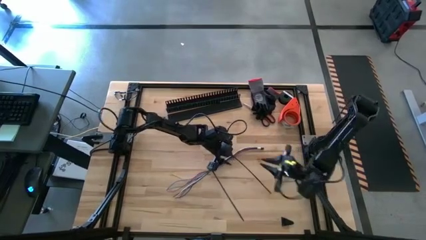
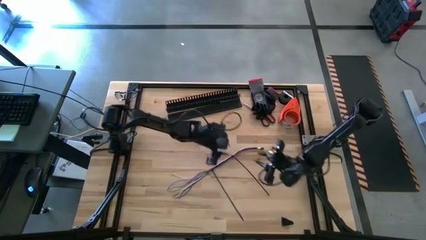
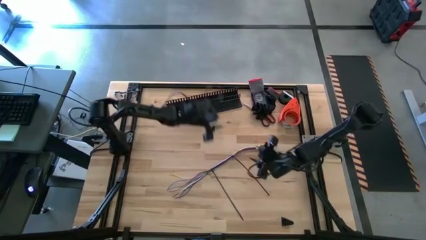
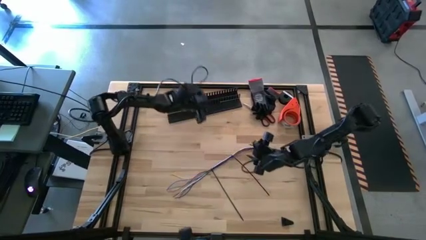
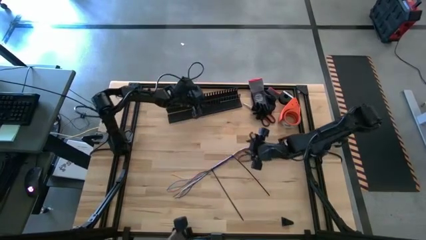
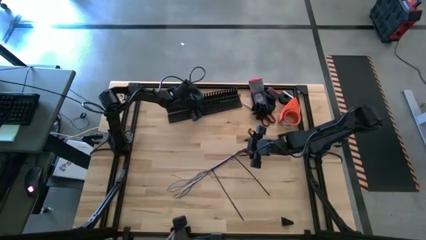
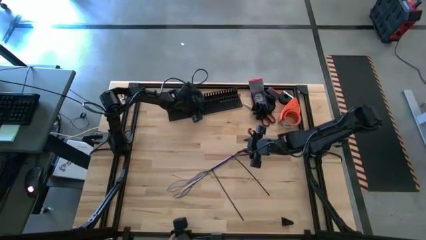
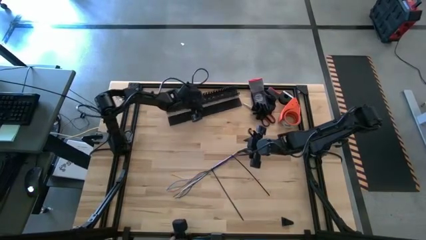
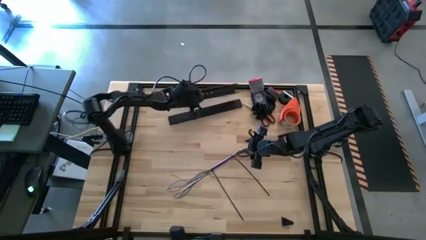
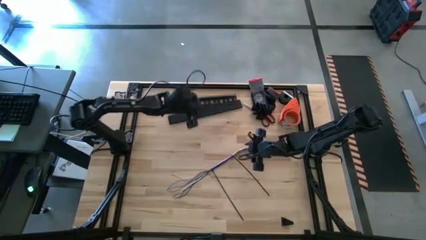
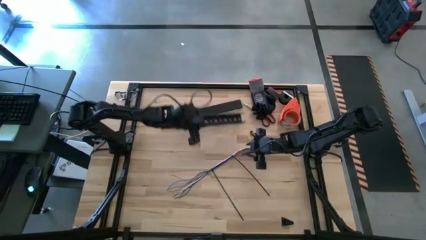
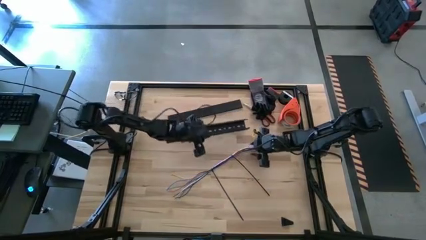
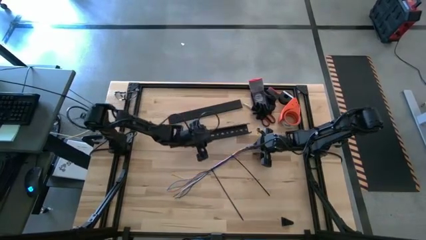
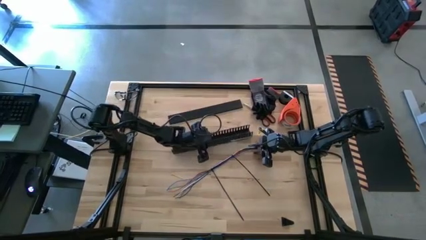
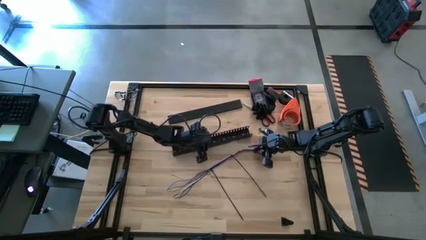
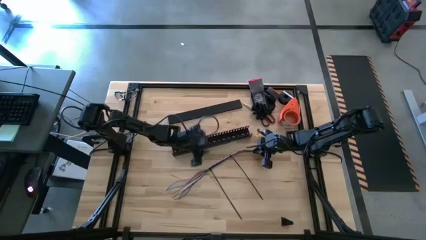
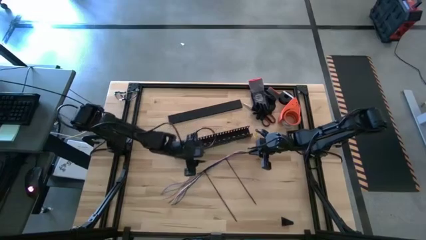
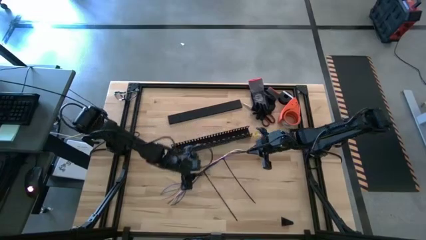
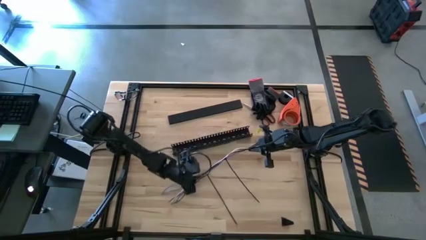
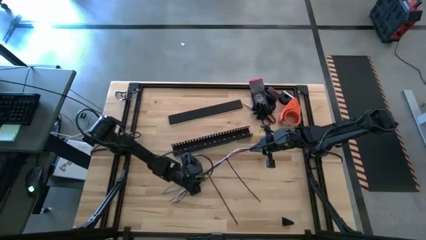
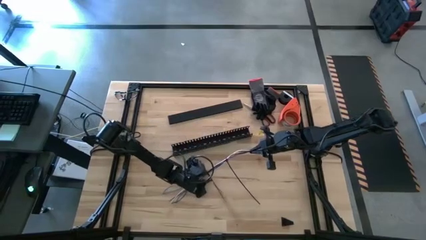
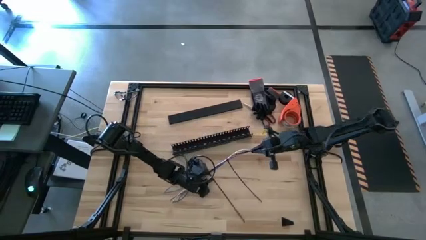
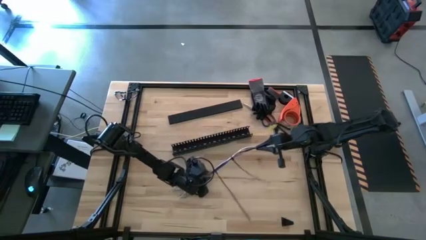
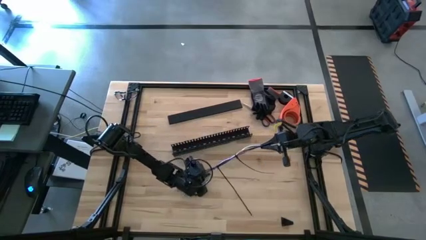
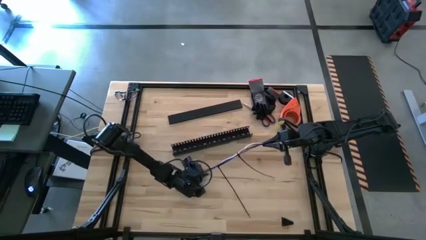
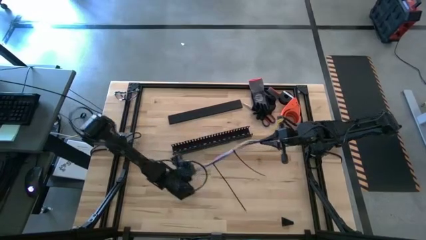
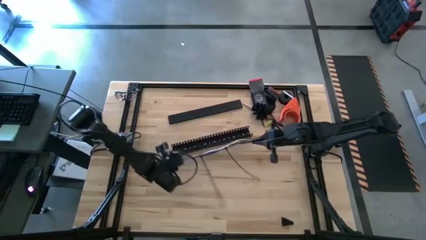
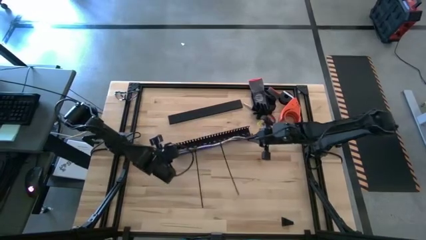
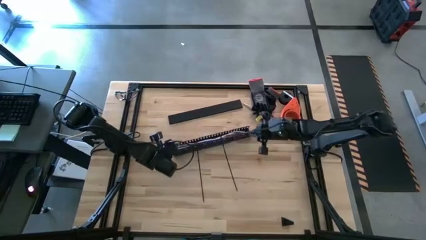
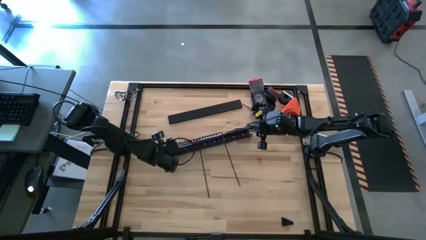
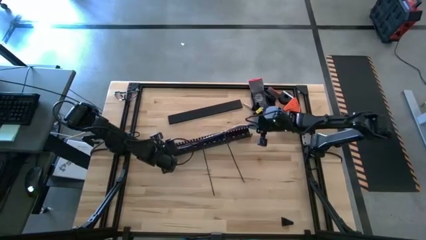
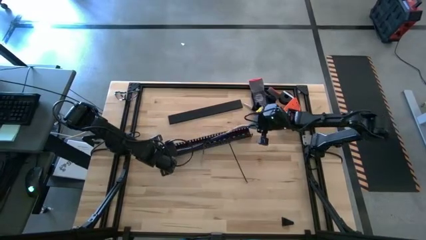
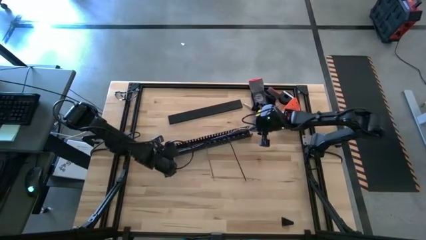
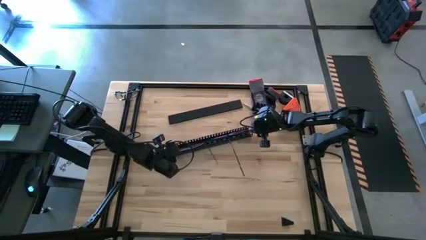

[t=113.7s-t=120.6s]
Task: Ziptie cables
Put the colored cable bundle into the black cable duct

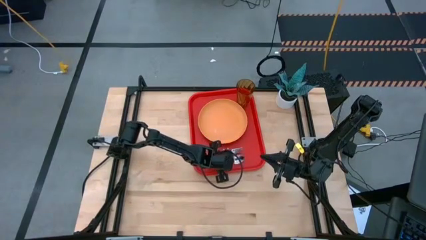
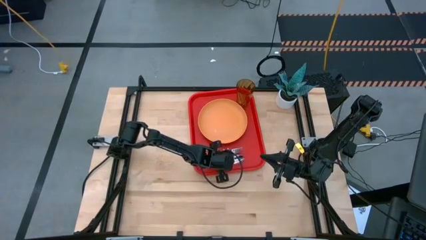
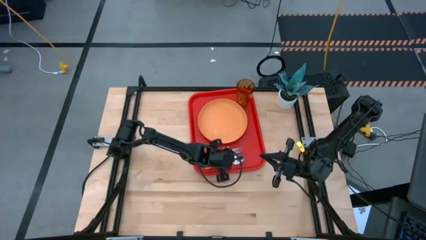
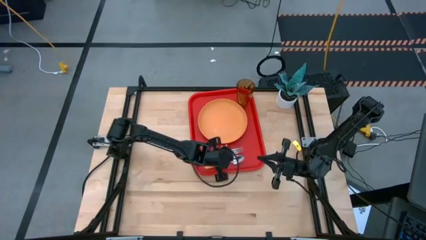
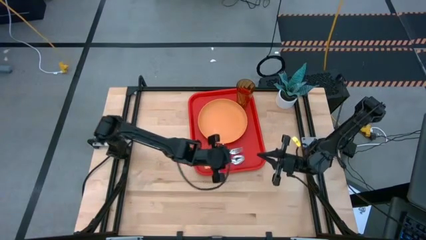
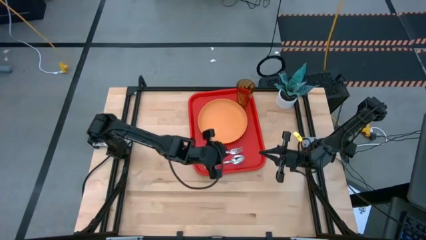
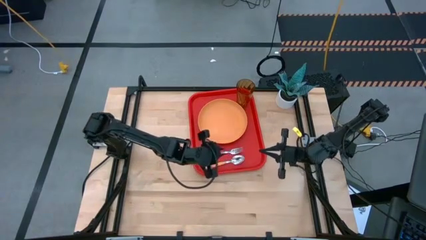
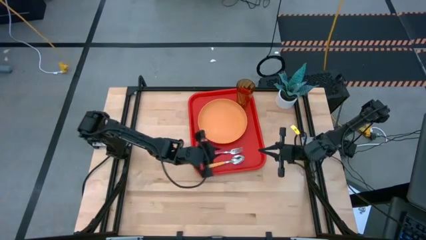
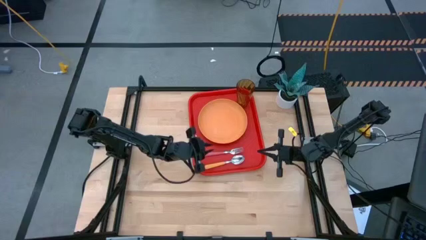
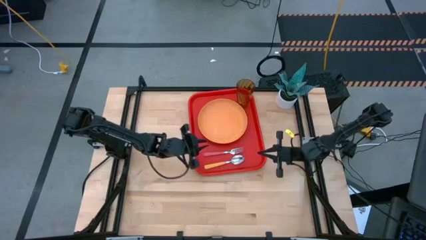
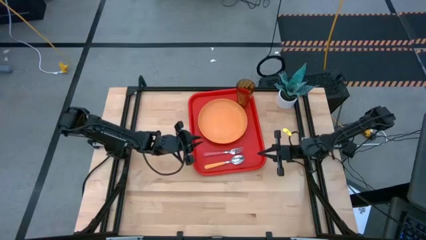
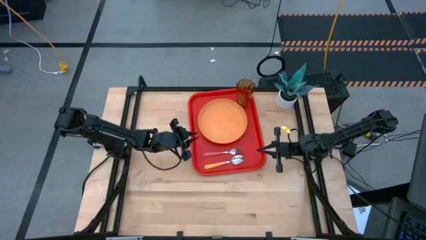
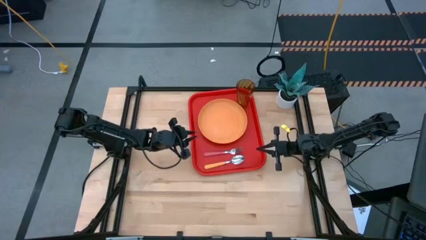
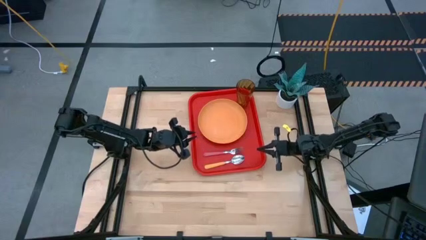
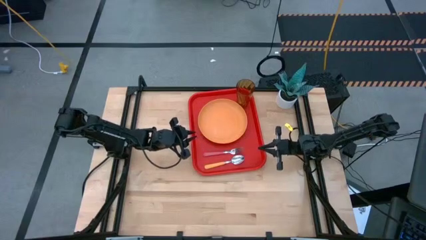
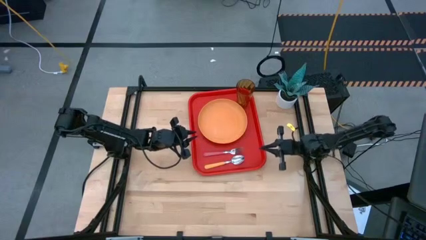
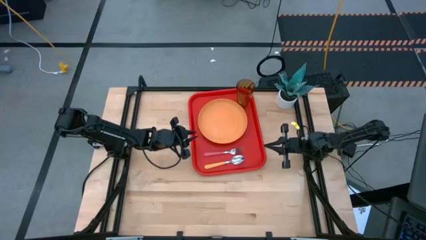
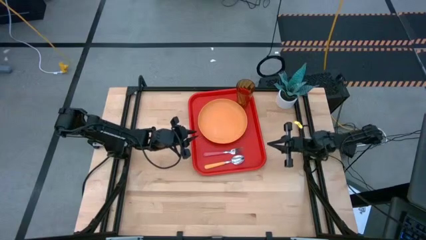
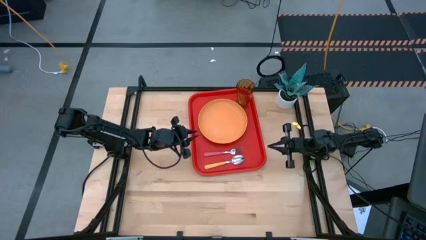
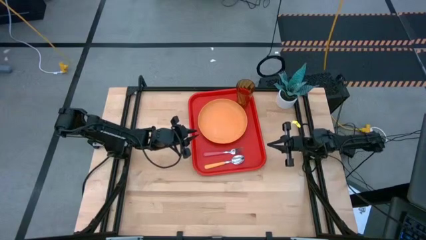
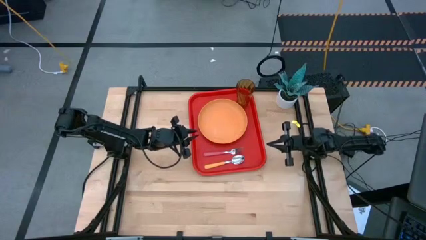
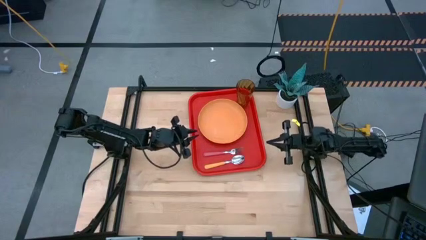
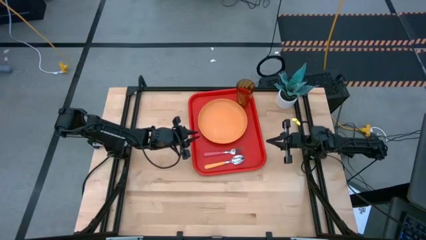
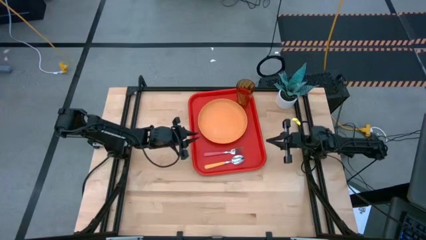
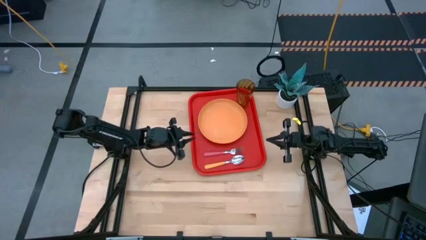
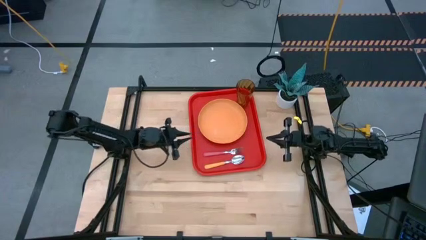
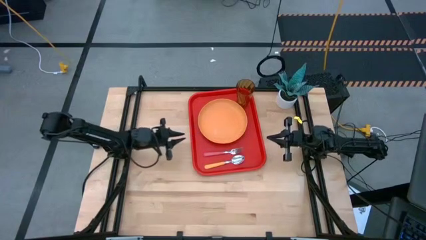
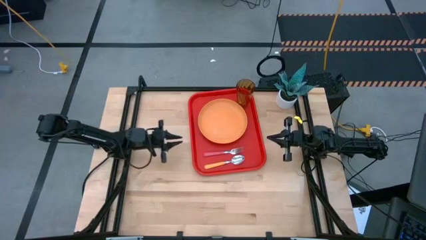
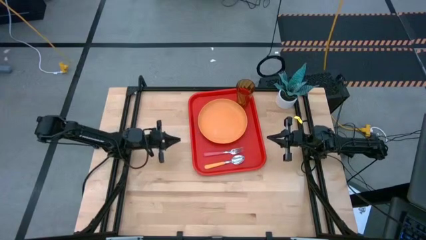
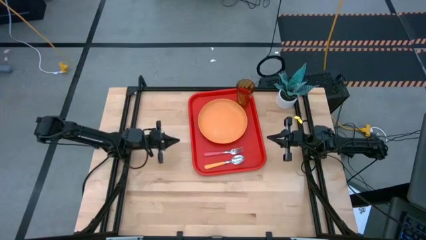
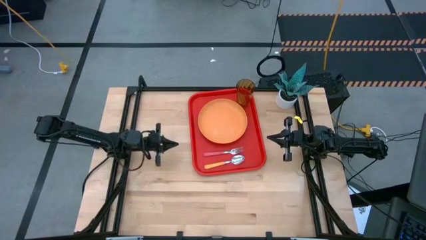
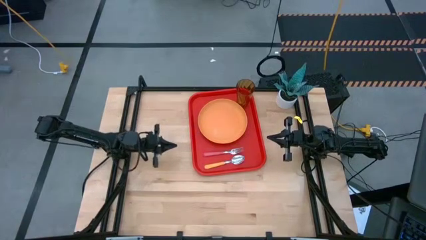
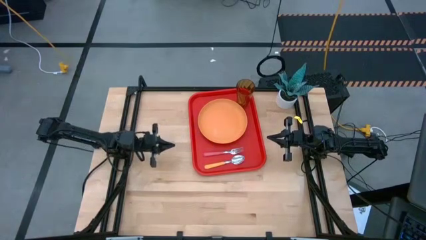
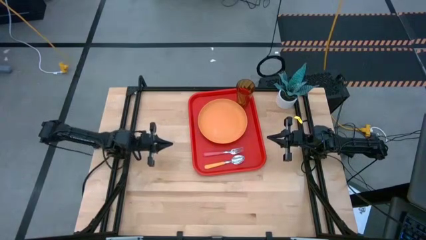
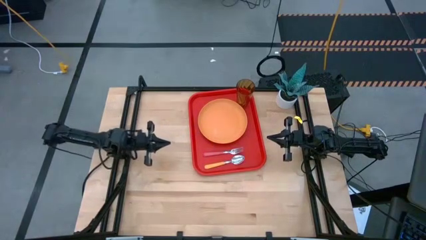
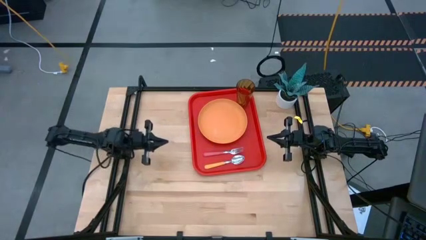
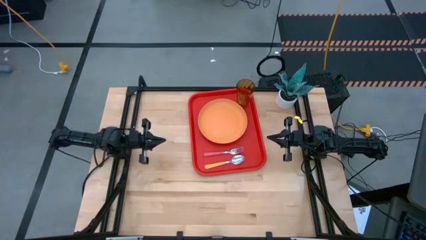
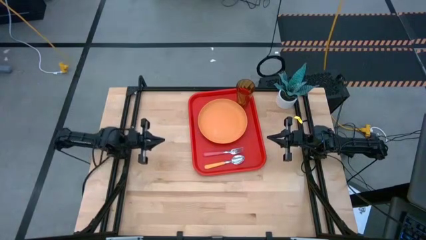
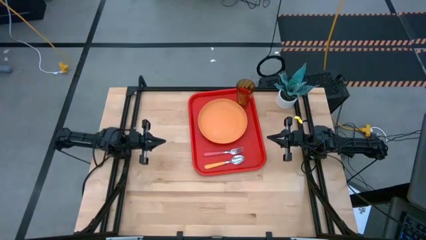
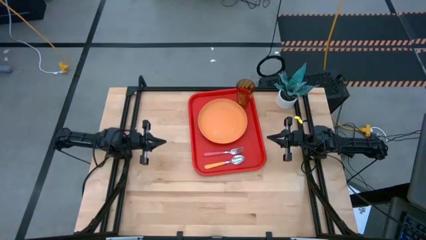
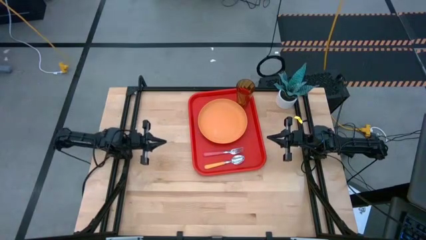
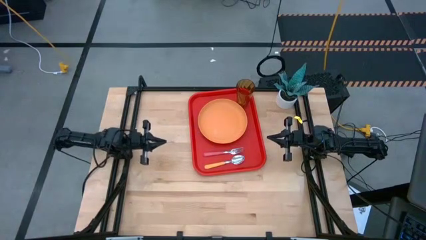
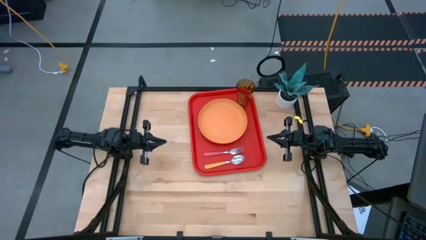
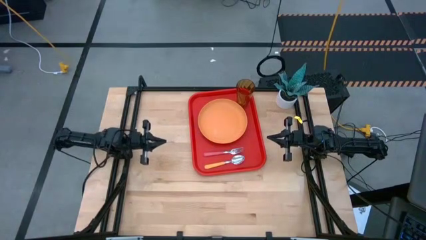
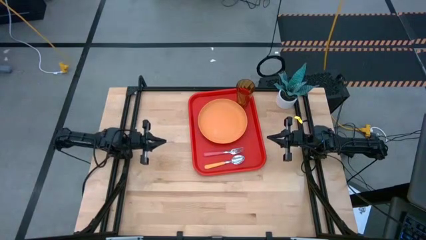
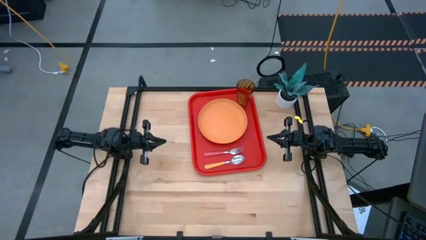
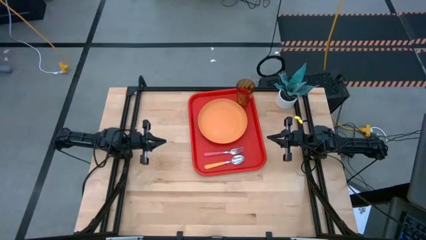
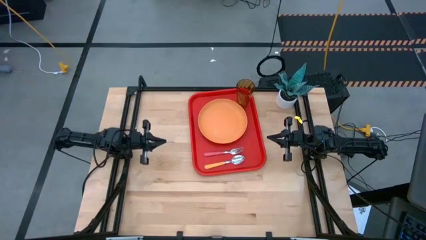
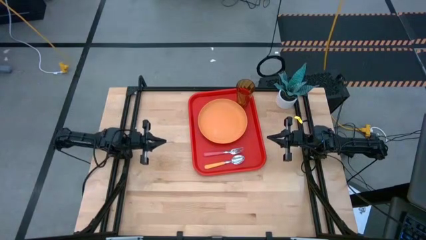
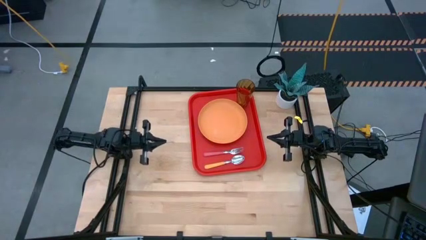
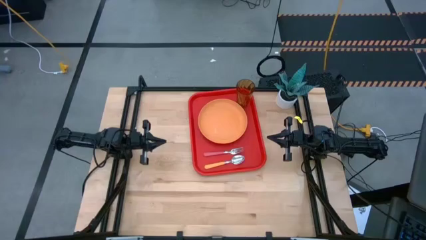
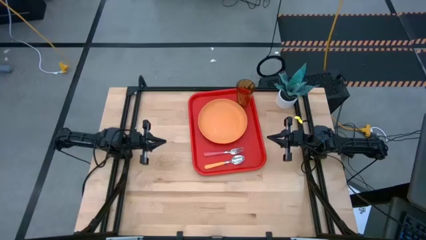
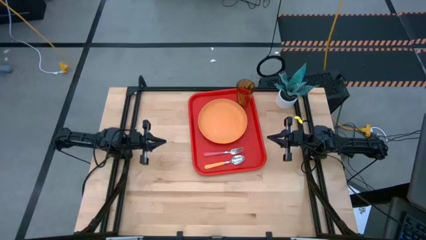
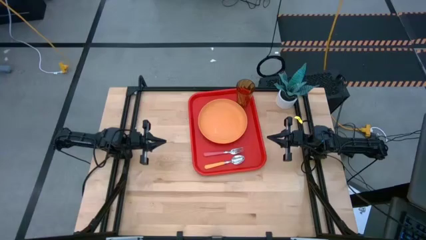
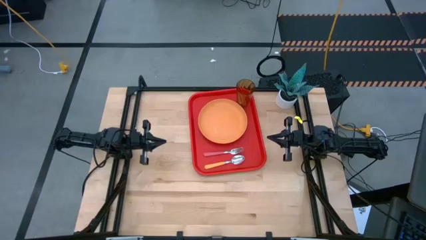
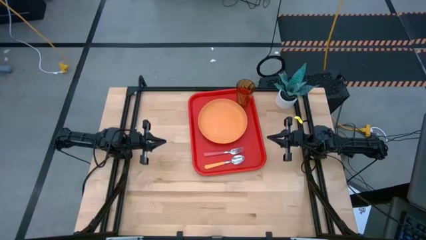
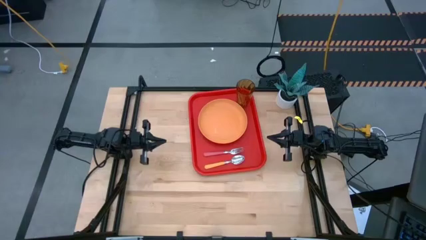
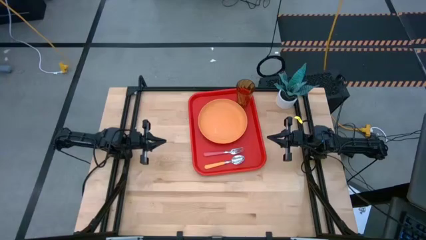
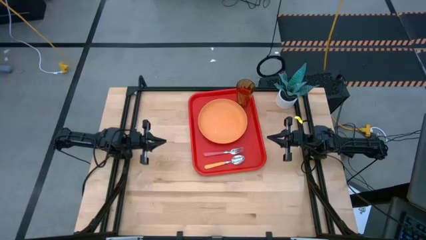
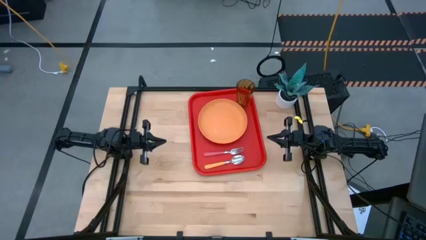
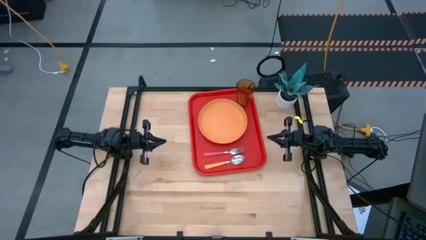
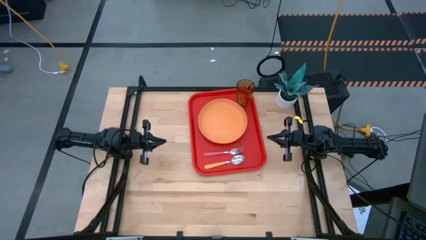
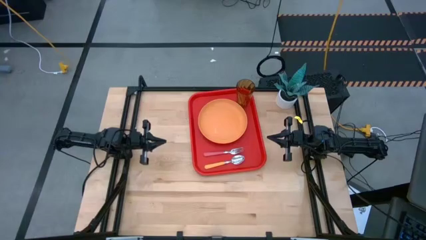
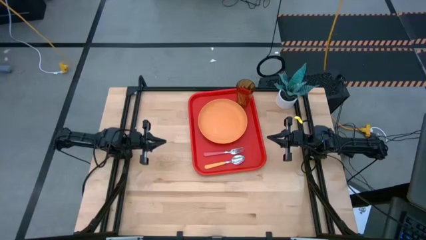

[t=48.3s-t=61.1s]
Task: Pick and place plate/cup/fork/spoon on tray
Return to Home Position
